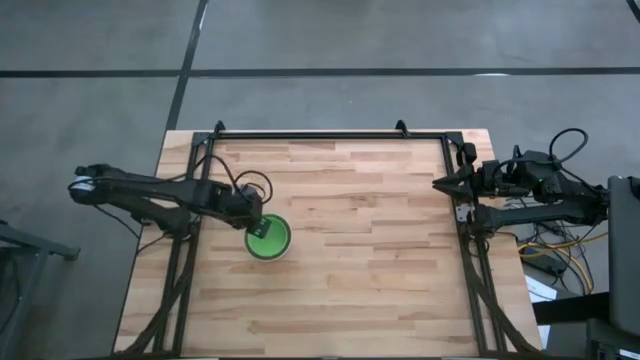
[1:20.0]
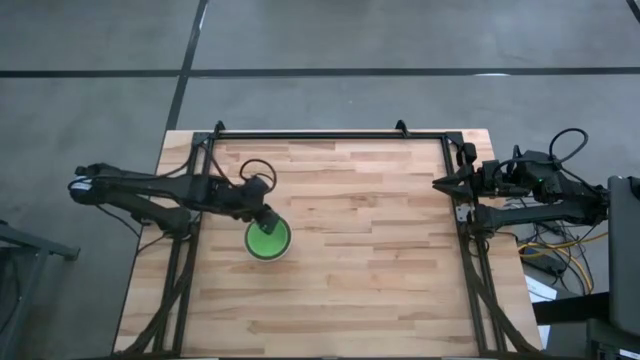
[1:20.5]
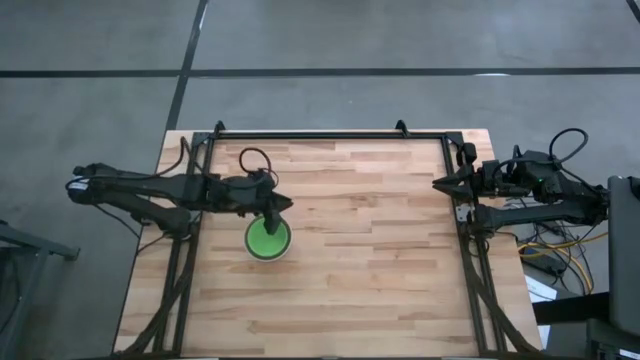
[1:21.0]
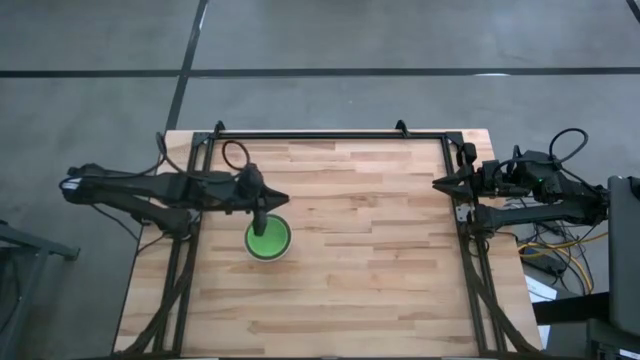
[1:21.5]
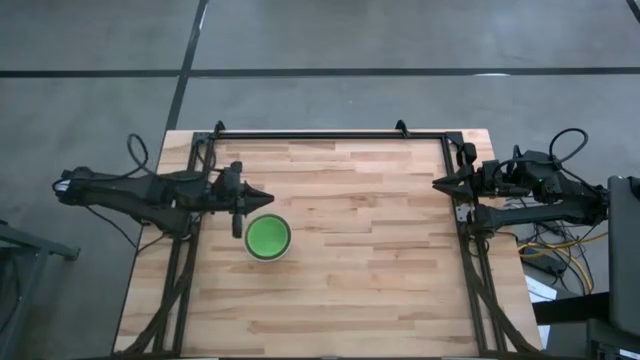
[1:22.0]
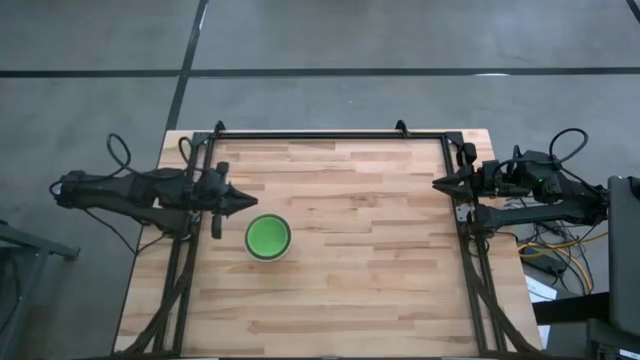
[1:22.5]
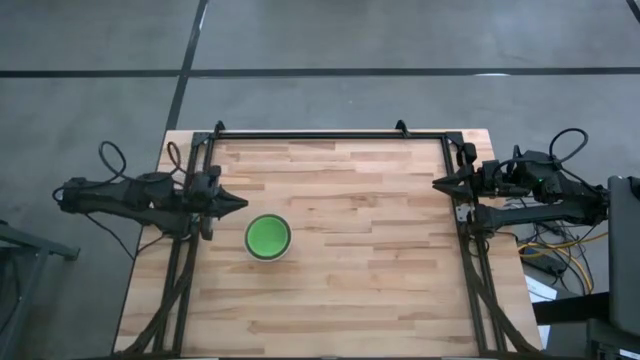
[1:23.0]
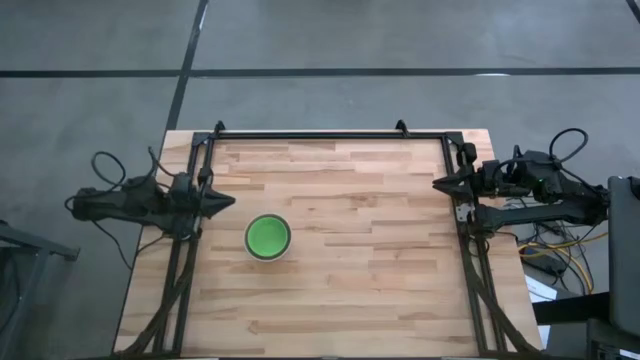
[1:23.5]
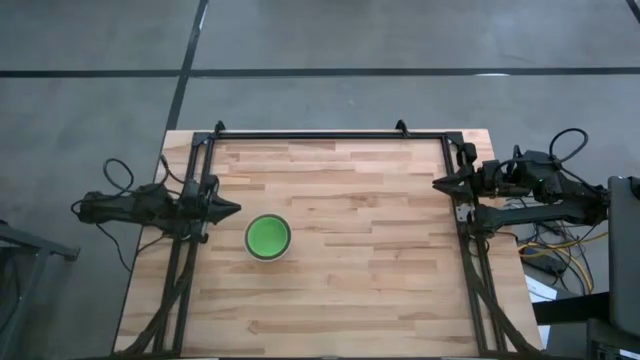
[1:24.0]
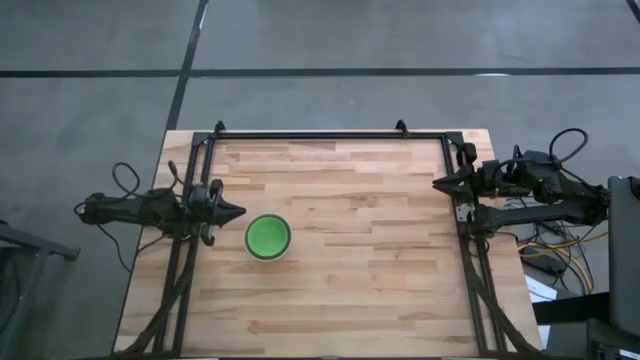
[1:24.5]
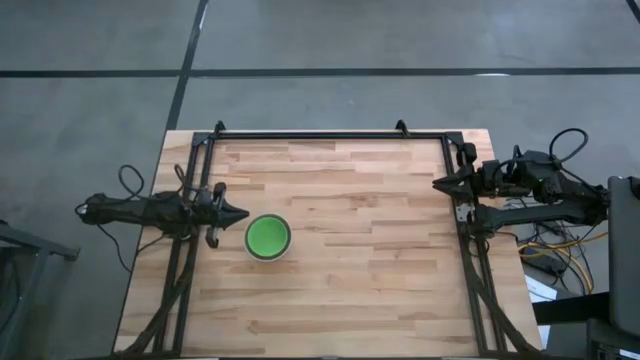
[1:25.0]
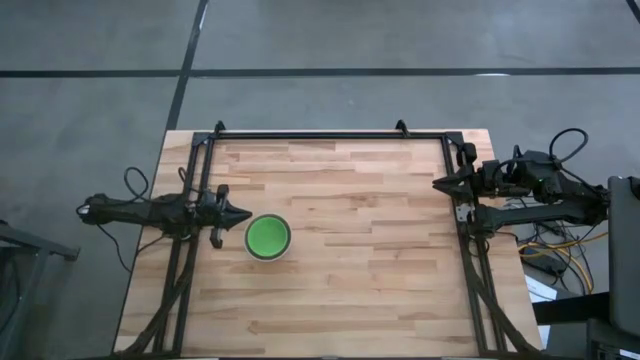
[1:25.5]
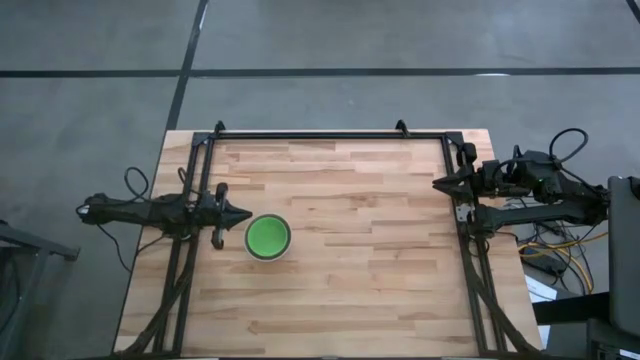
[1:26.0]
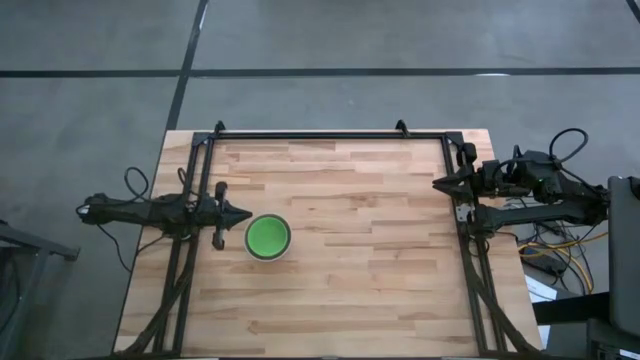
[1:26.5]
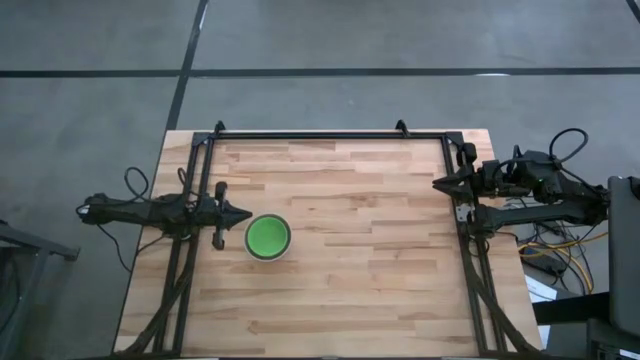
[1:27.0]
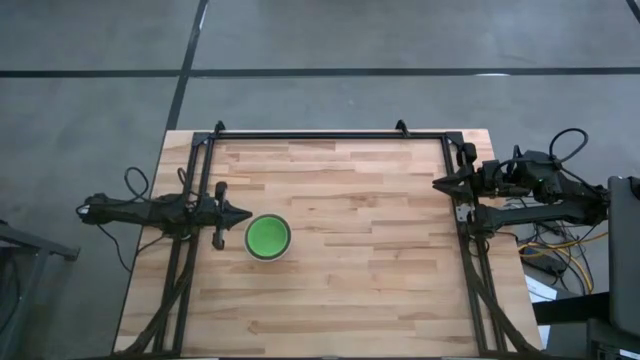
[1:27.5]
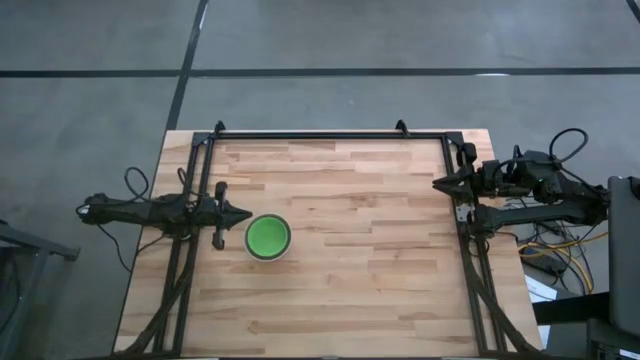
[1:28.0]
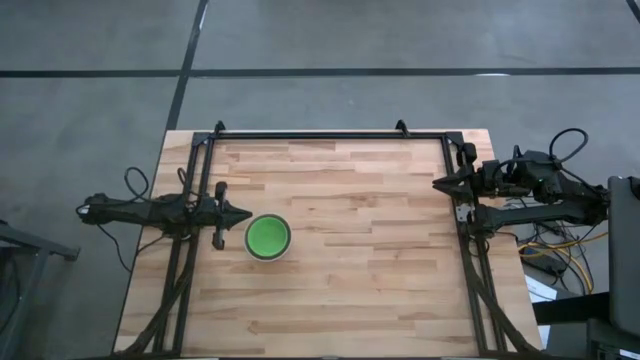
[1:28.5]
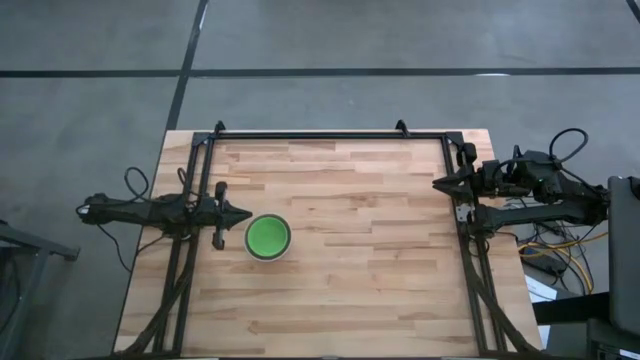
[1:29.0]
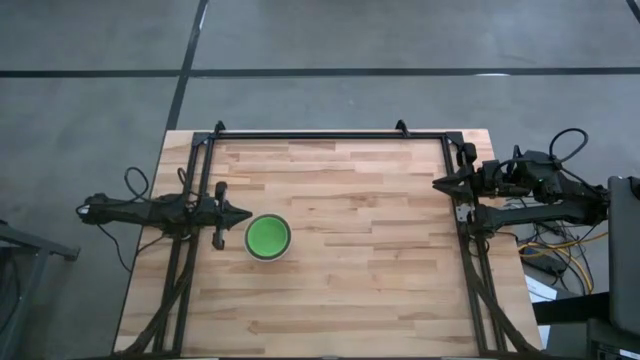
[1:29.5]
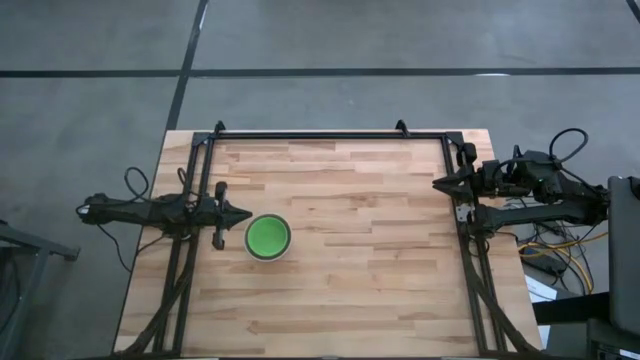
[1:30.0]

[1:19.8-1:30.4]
Return to Home Position

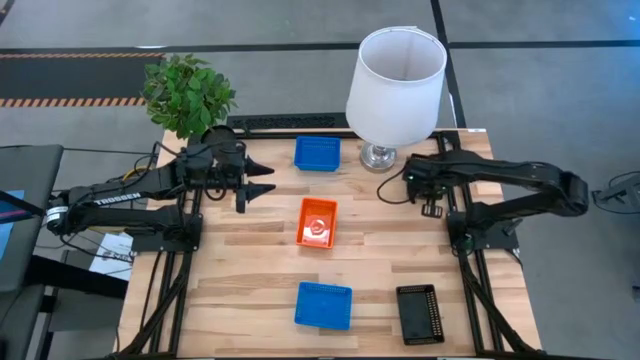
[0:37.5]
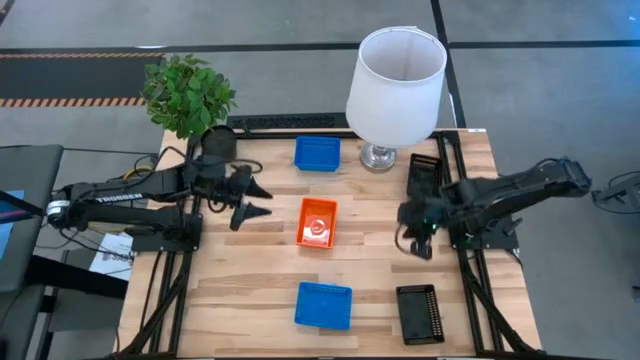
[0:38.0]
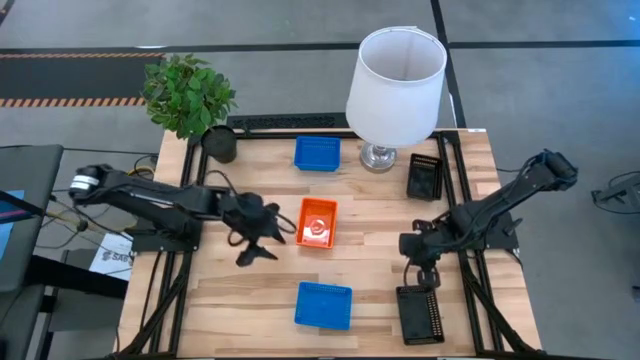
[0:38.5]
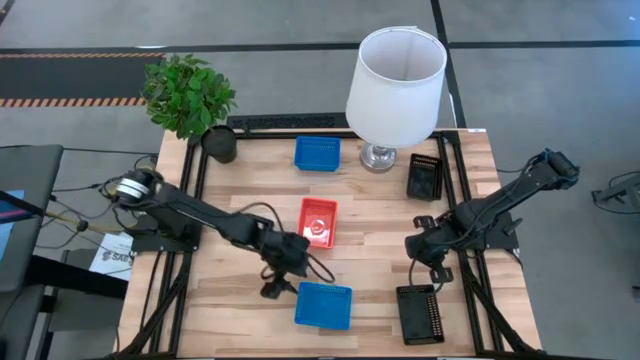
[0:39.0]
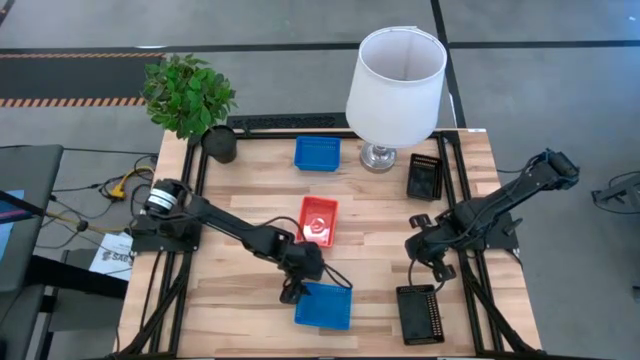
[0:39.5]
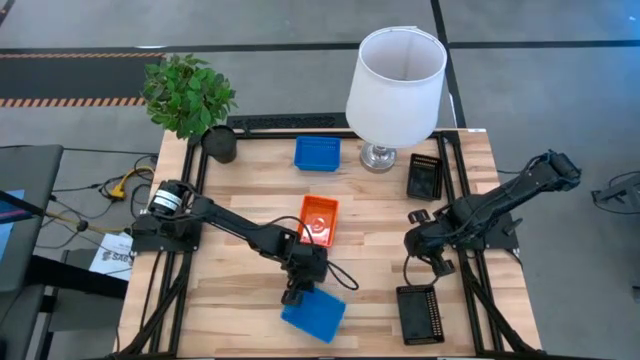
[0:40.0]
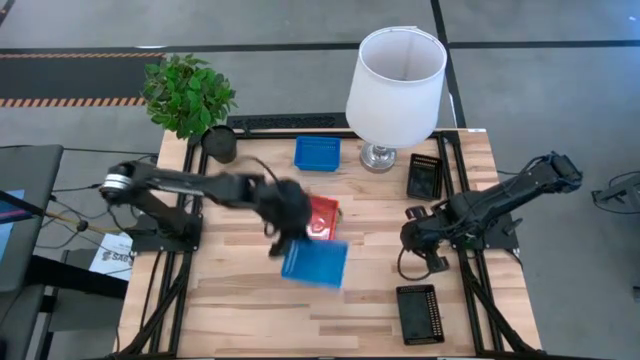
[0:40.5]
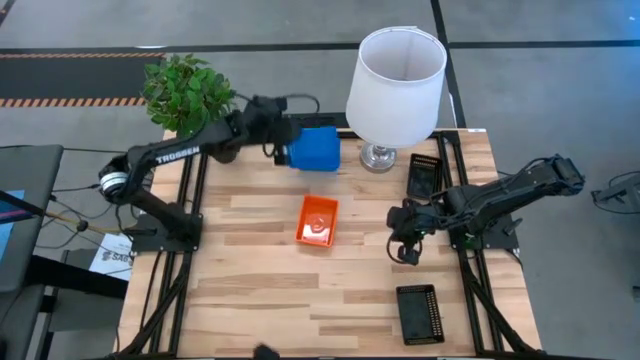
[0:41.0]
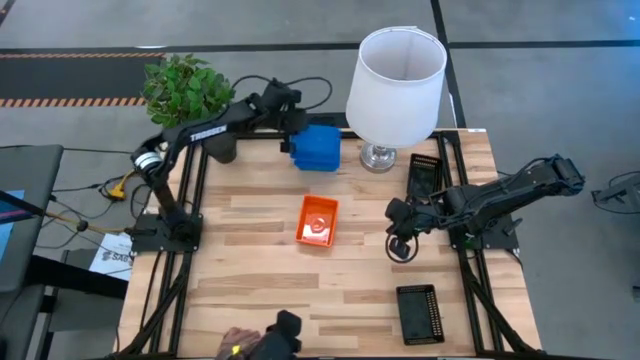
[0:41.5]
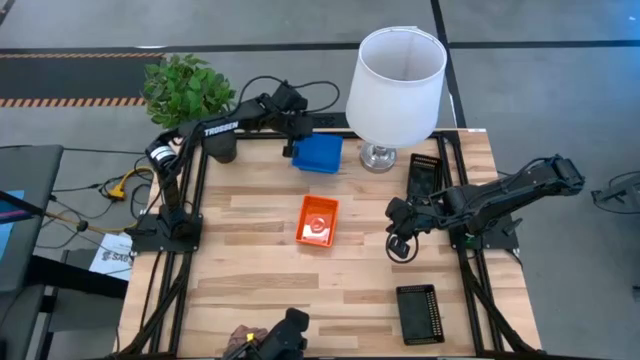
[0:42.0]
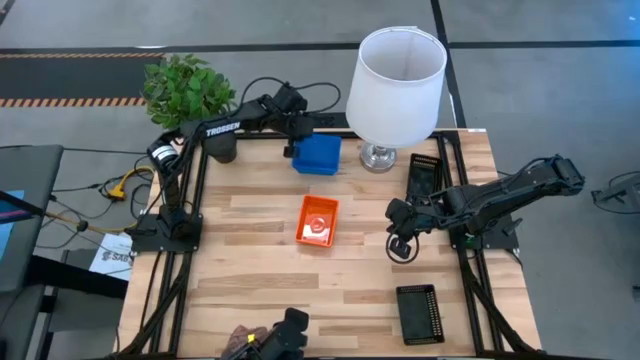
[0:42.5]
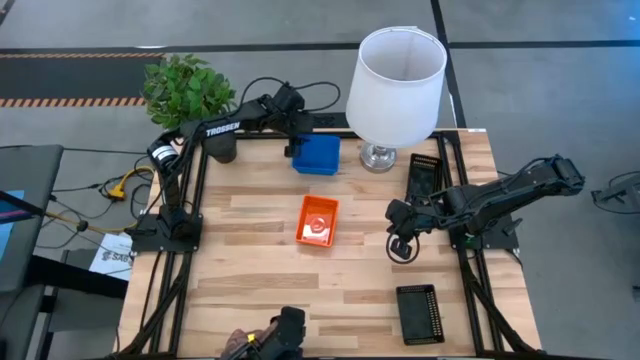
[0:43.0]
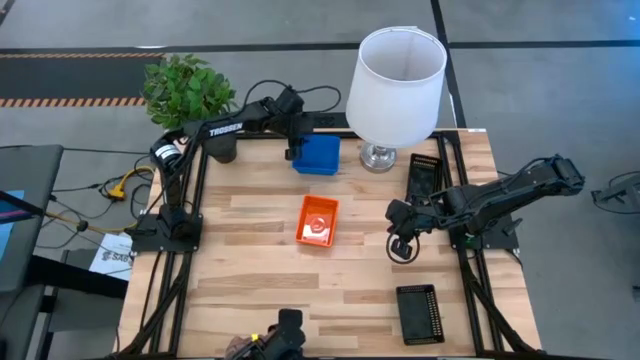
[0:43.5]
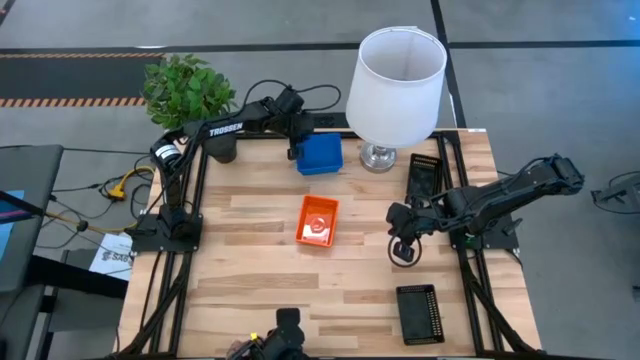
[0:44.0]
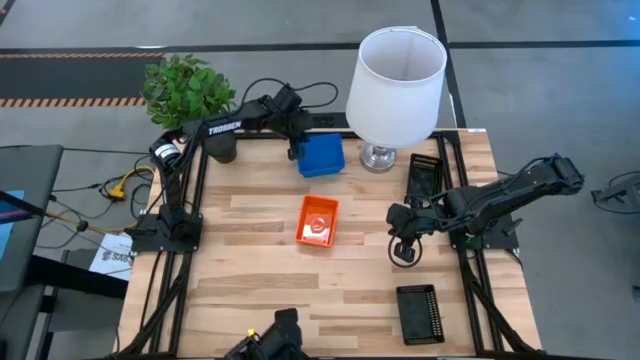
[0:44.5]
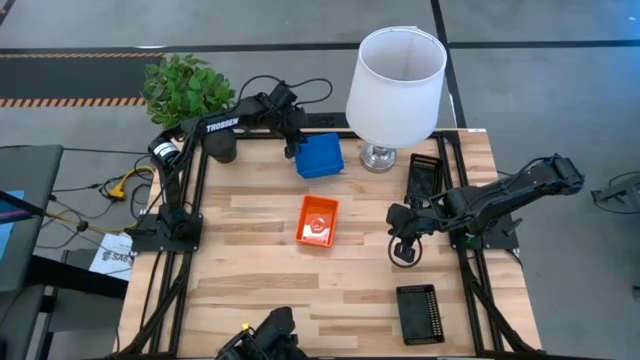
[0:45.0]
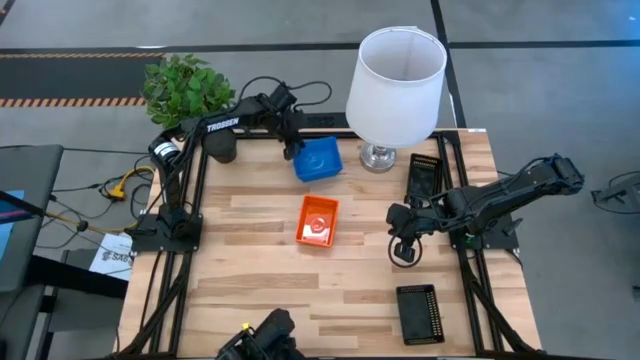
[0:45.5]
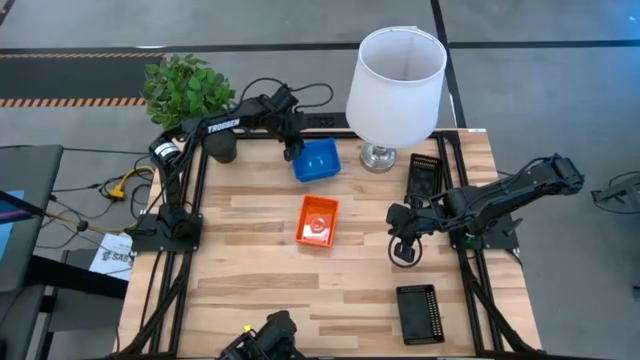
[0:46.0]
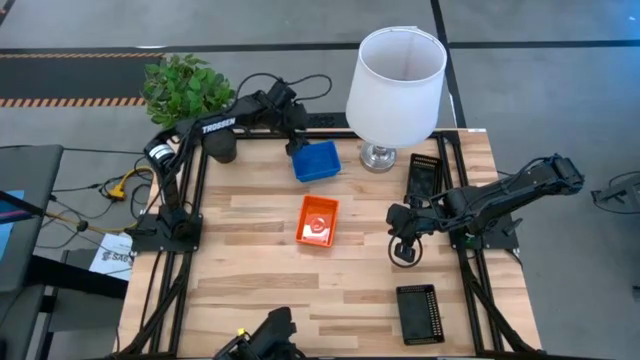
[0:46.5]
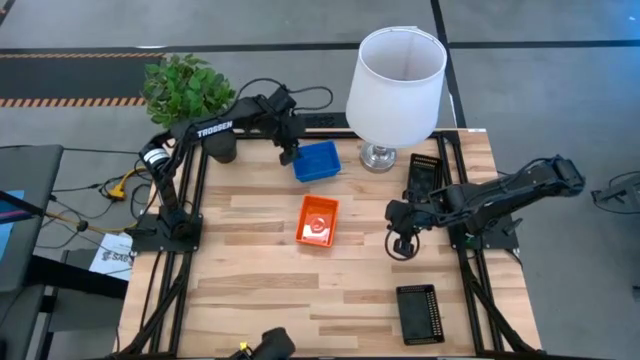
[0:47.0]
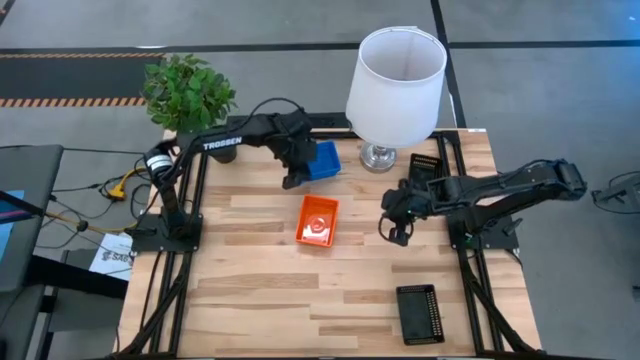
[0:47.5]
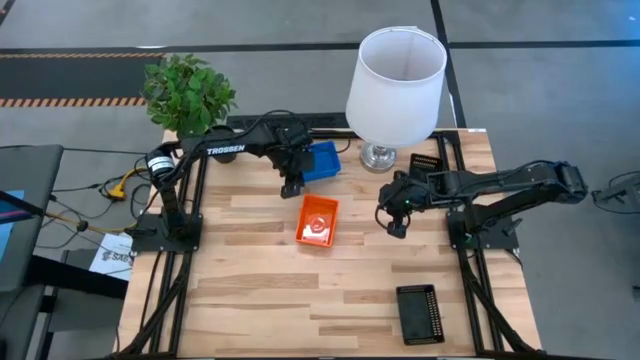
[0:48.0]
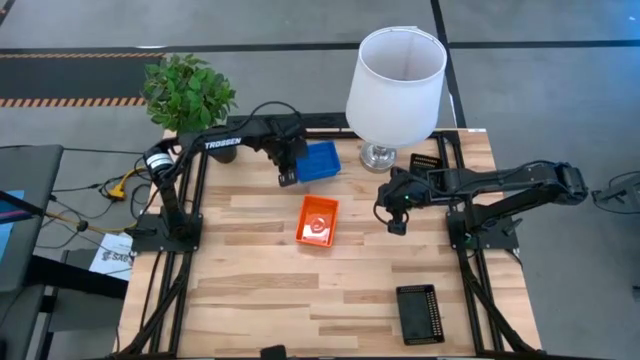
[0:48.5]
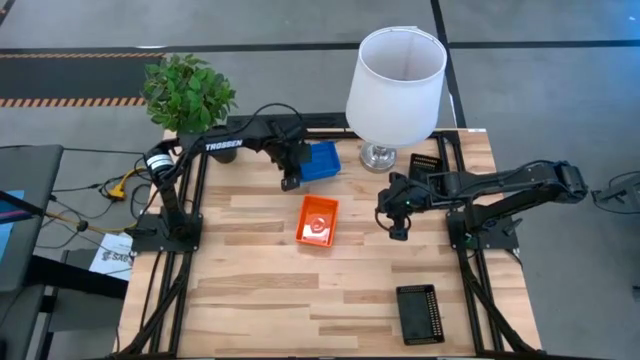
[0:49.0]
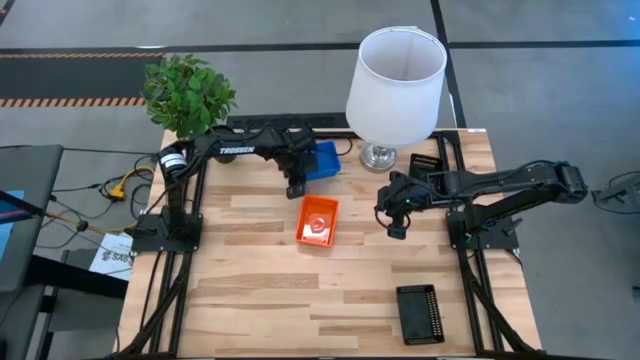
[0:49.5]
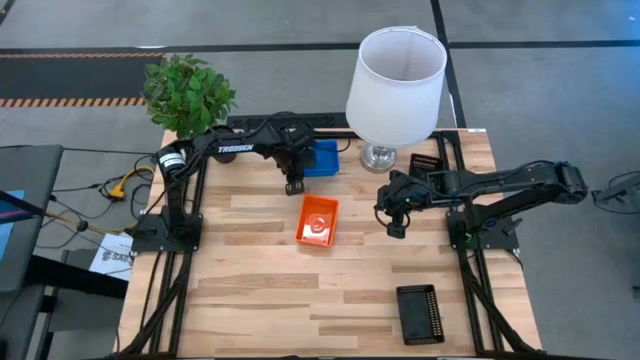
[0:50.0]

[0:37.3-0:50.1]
Stack the bottom blue bin on top of the top blue bin
